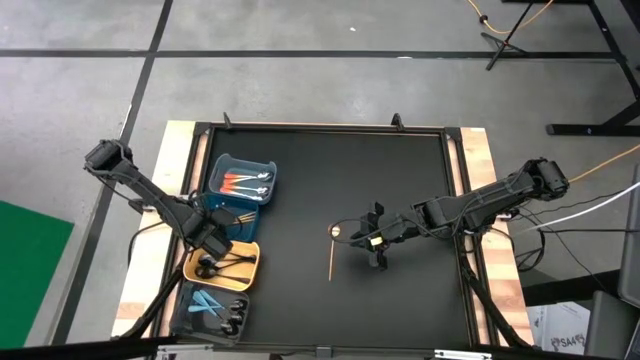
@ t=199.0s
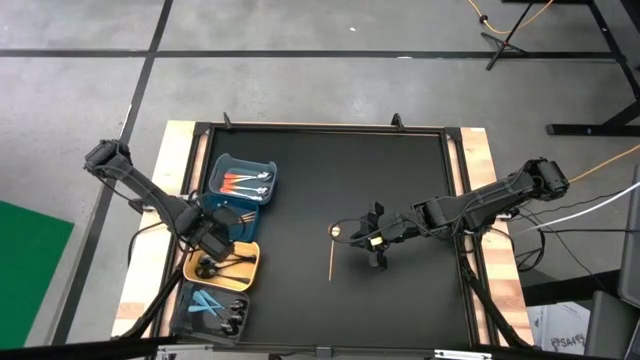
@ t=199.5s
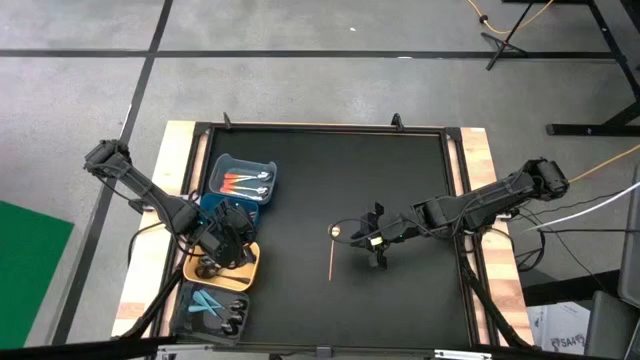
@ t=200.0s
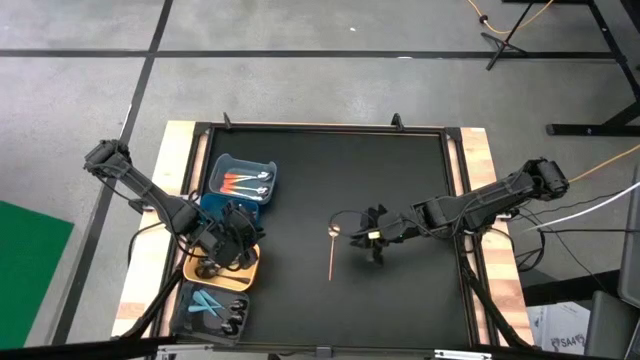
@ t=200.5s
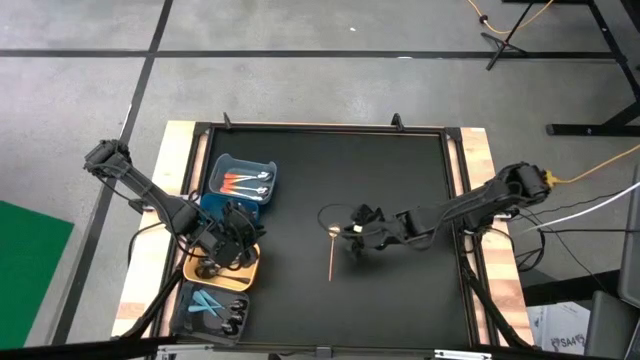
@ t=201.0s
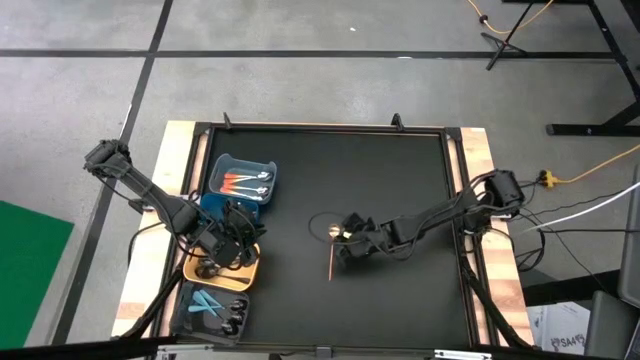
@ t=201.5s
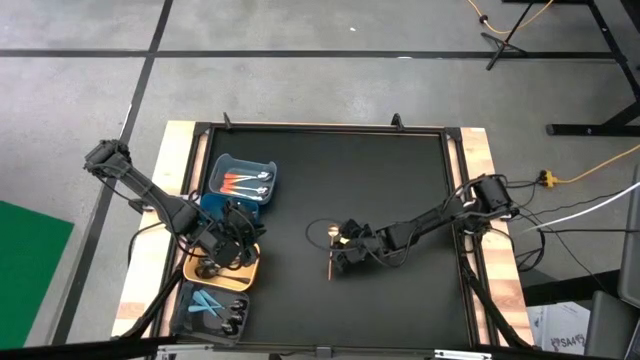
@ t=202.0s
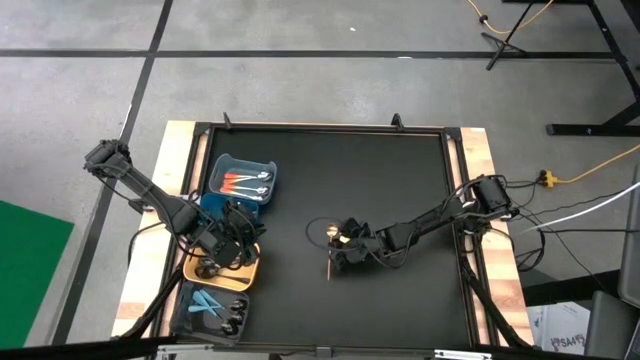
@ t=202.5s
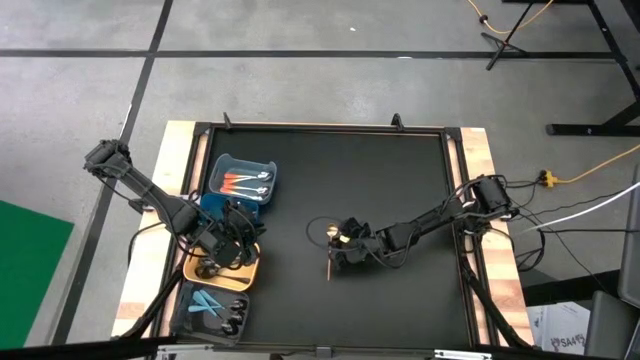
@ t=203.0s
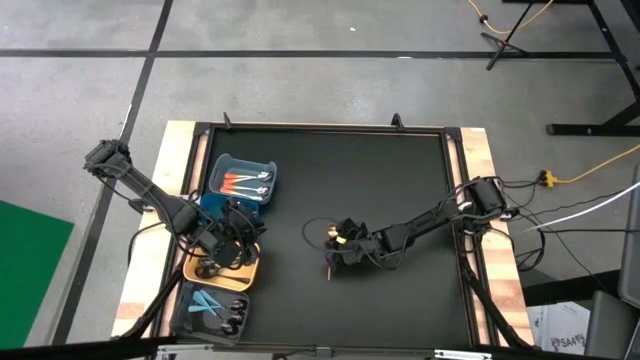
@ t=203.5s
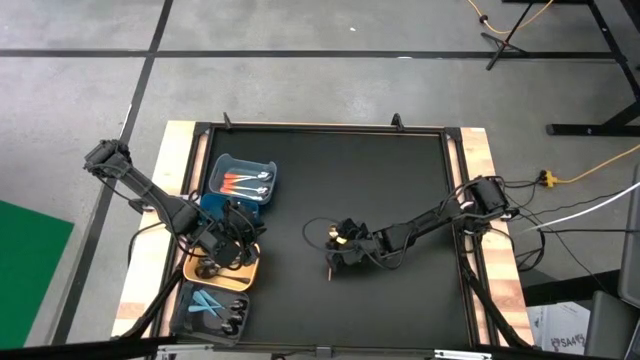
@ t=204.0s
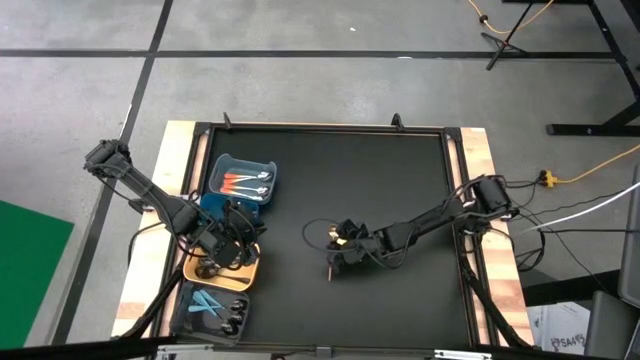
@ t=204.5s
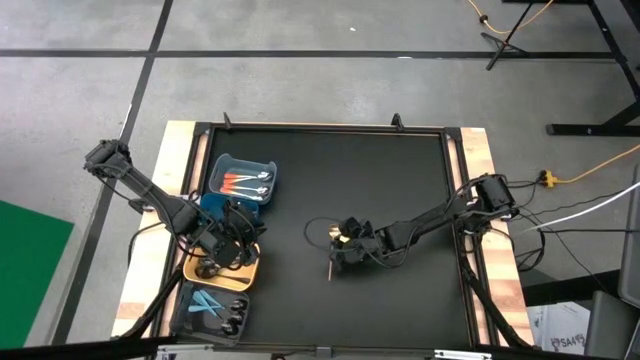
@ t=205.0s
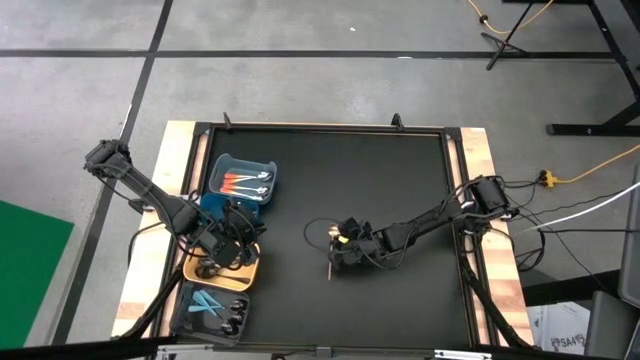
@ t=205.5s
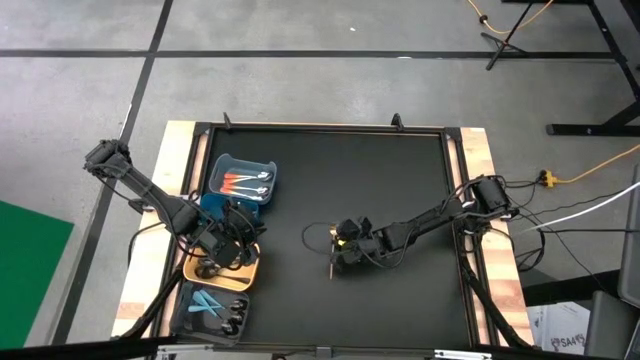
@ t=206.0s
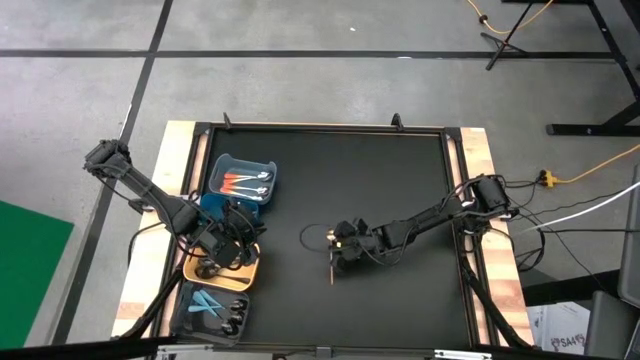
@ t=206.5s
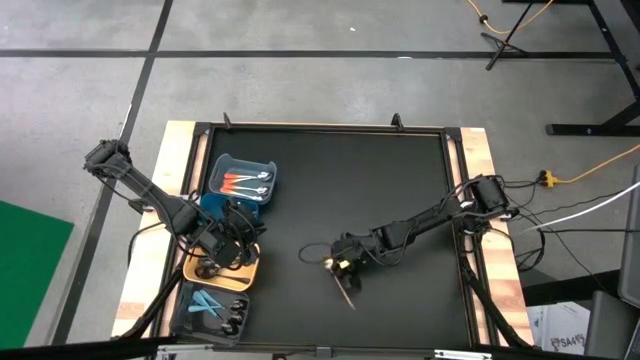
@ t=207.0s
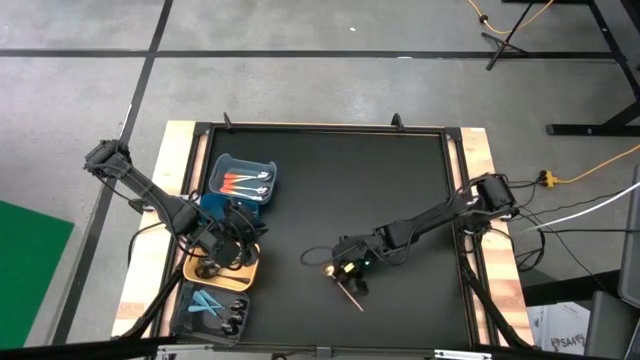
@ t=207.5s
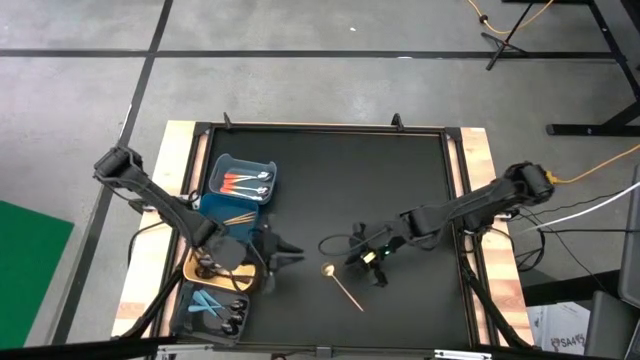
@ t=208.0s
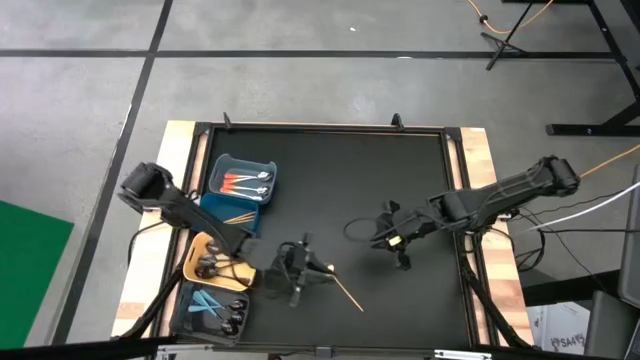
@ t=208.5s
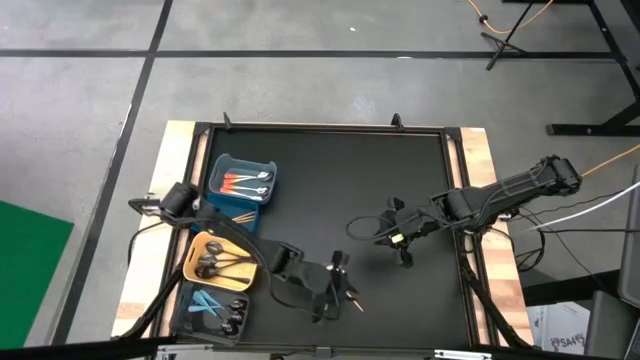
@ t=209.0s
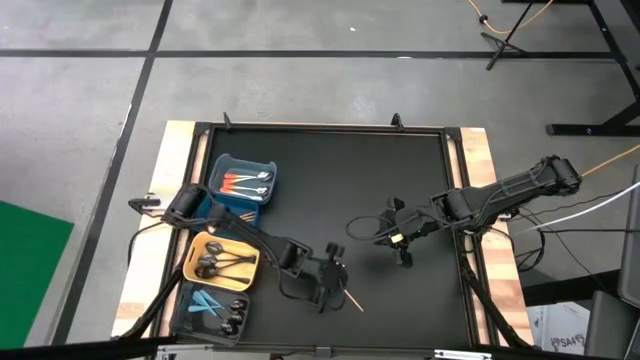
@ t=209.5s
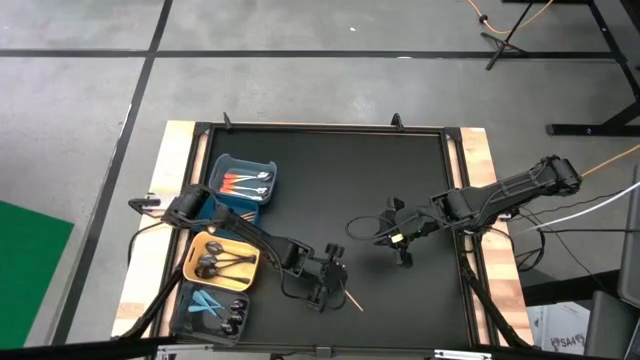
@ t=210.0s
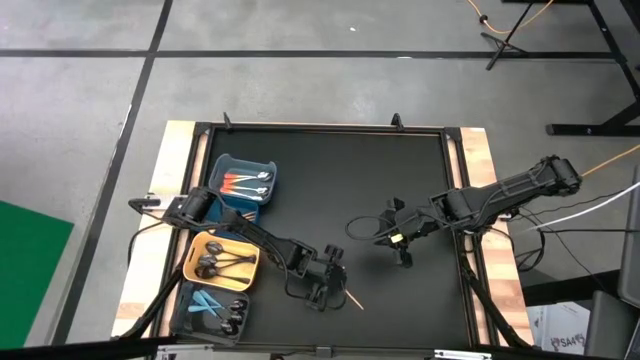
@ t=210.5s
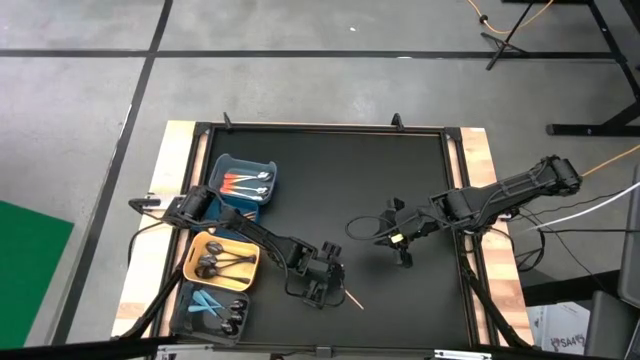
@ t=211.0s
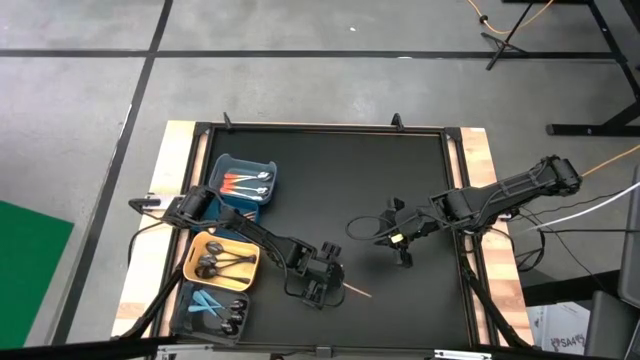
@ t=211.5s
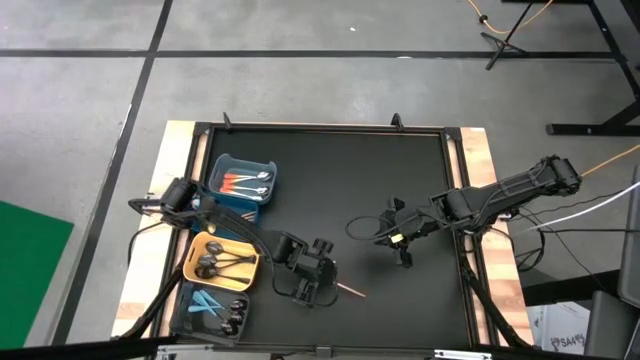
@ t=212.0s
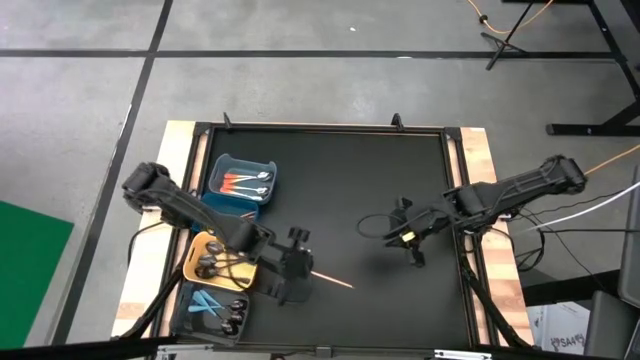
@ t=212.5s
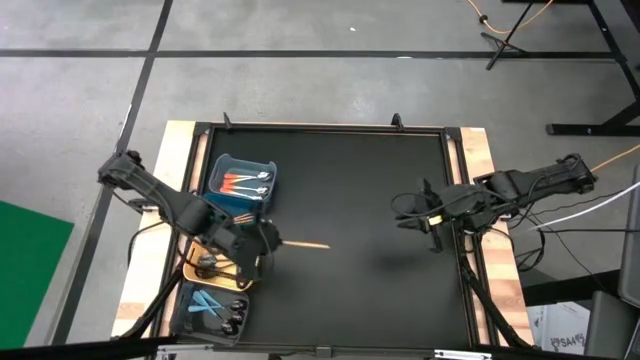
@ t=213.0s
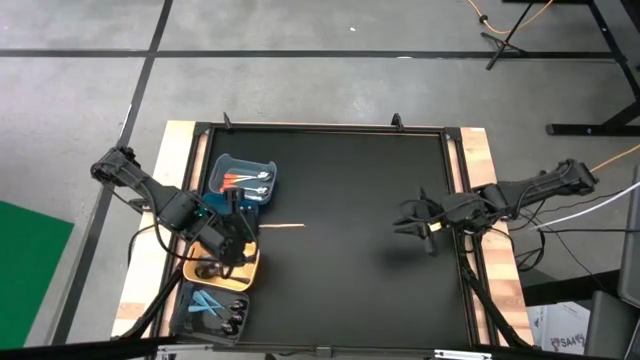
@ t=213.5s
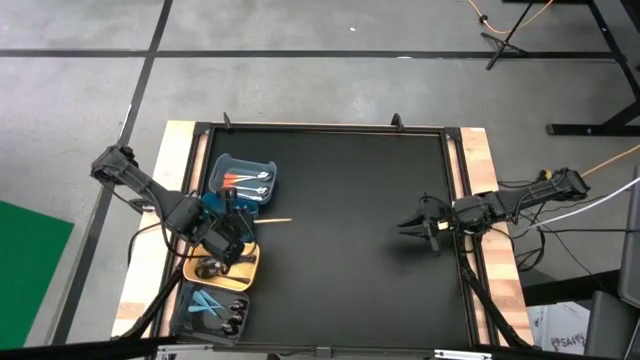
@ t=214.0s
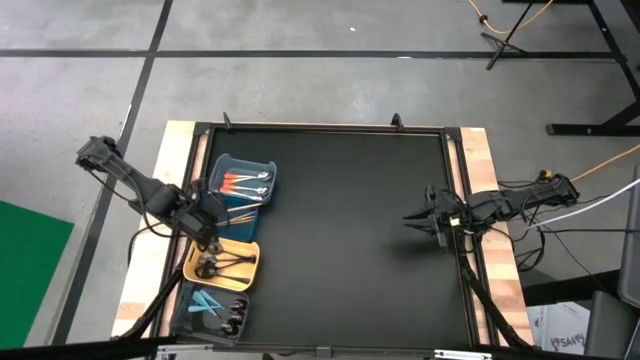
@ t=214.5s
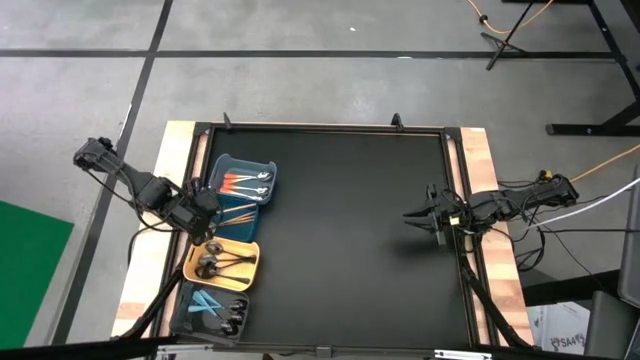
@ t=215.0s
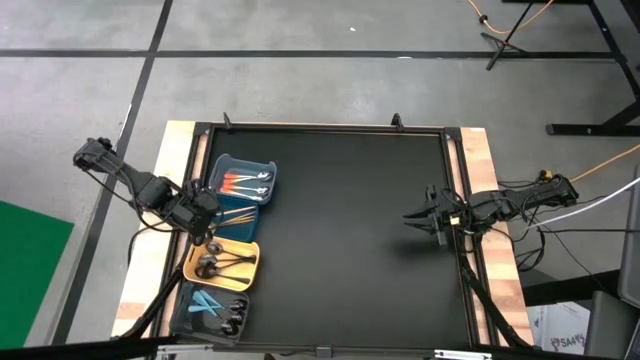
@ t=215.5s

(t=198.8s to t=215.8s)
Task: Sort silverware by color (type)
Put the gold spoon into the blue bin

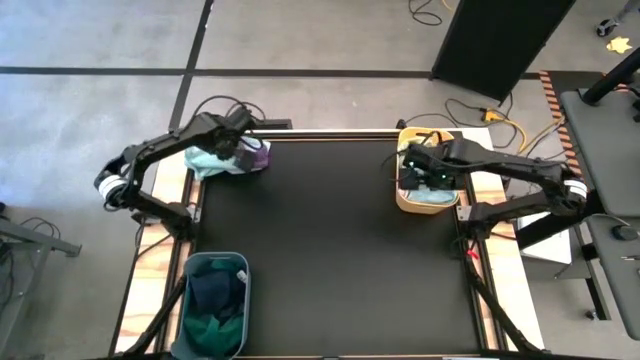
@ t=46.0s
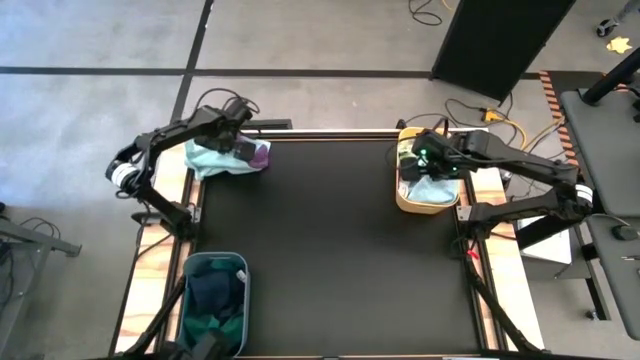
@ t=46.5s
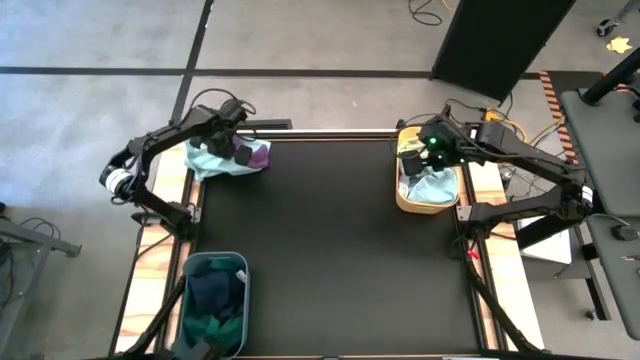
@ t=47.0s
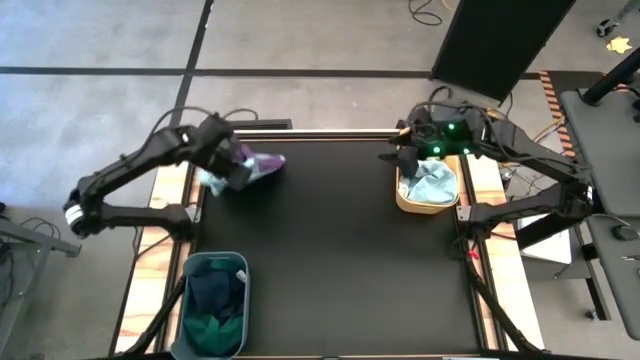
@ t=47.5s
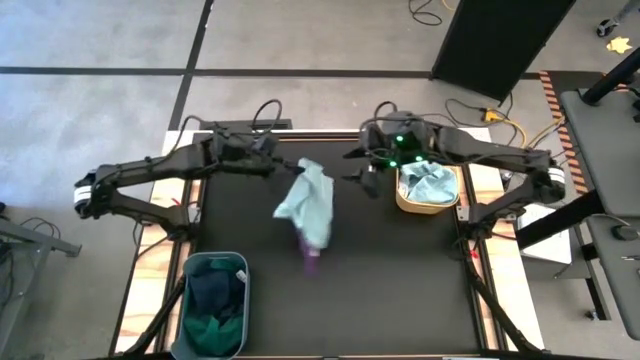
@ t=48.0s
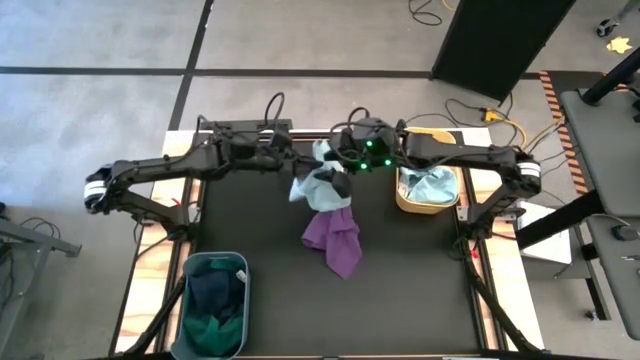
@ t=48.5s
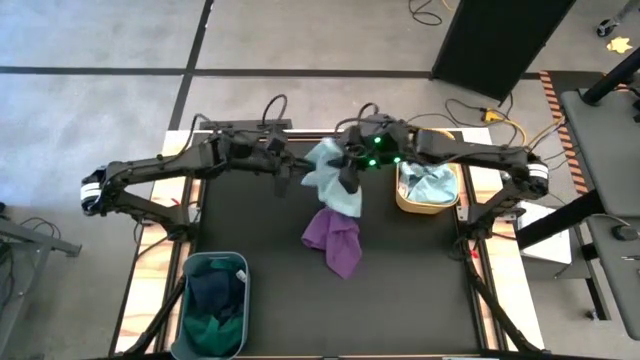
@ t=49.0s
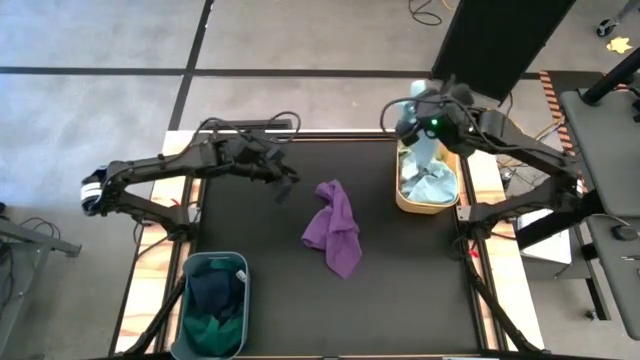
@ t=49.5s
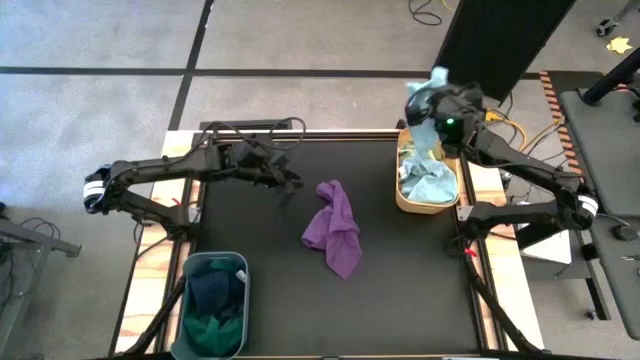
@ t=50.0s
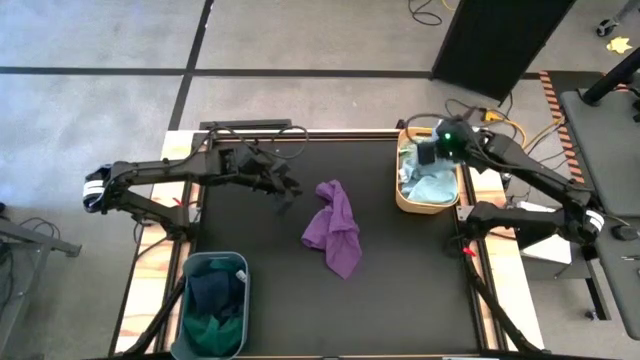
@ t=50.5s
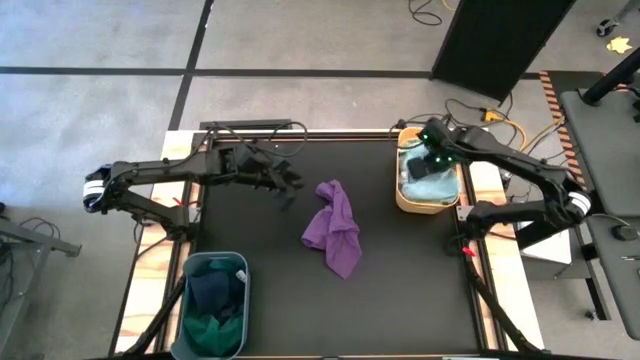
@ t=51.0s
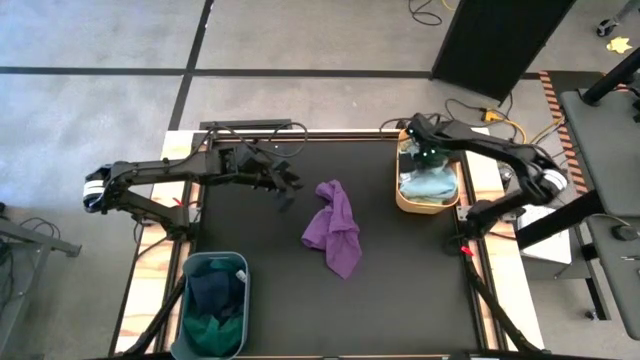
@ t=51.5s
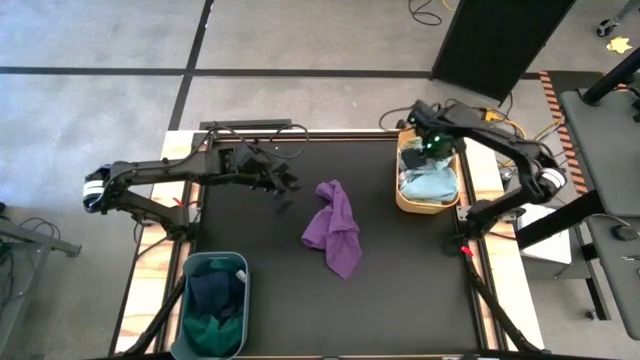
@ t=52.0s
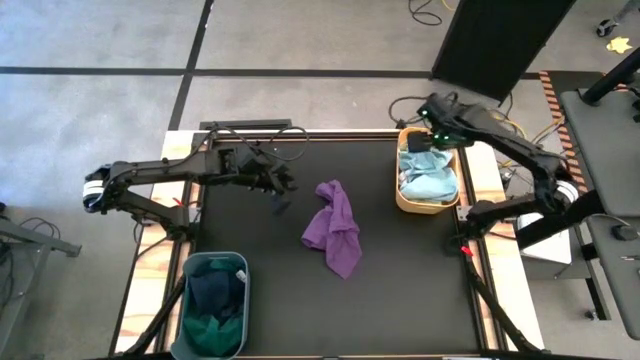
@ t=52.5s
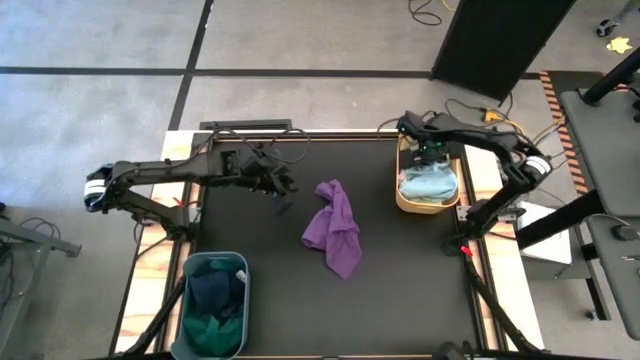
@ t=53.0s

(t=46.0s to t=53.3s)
Task: Sort microfiber towel by color & place in baskets
Put the light blue microfiber towel into the yellow bin
